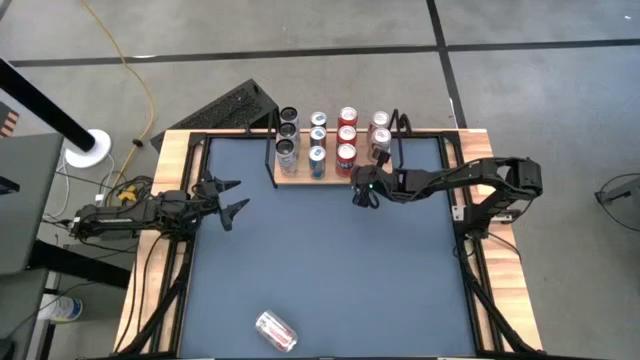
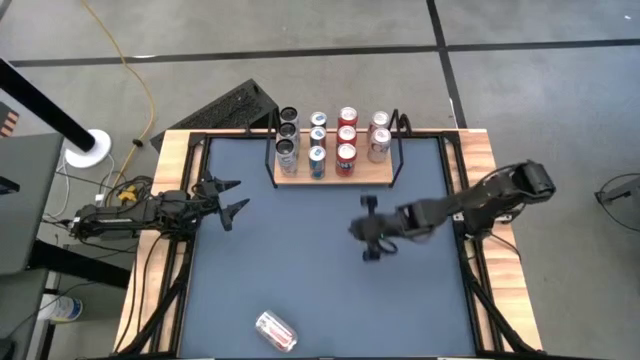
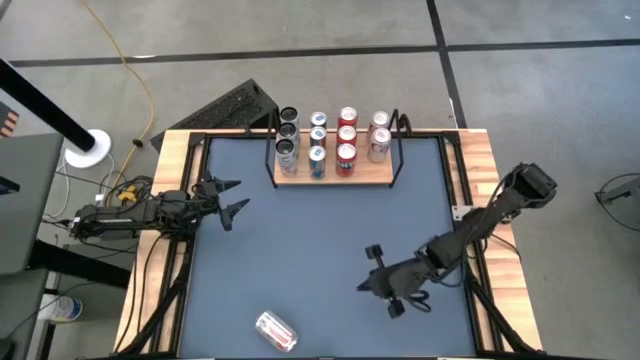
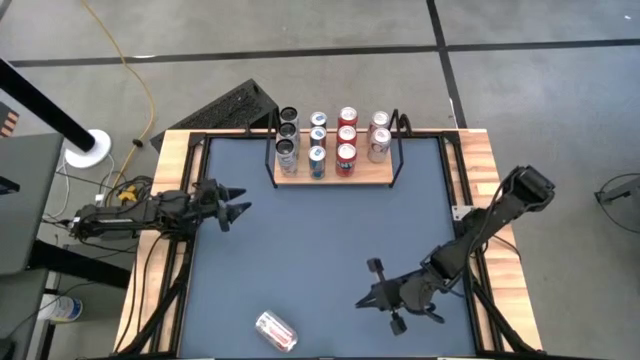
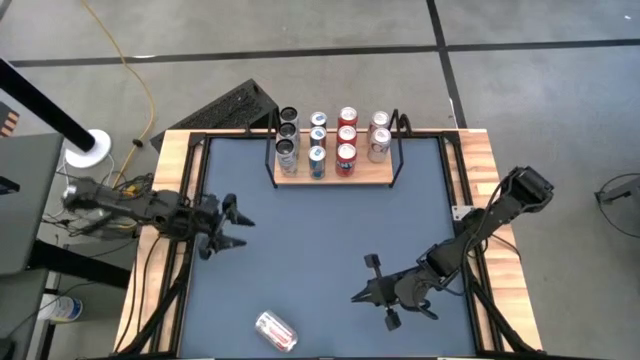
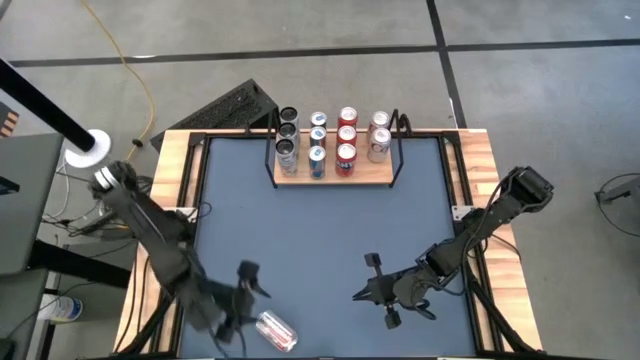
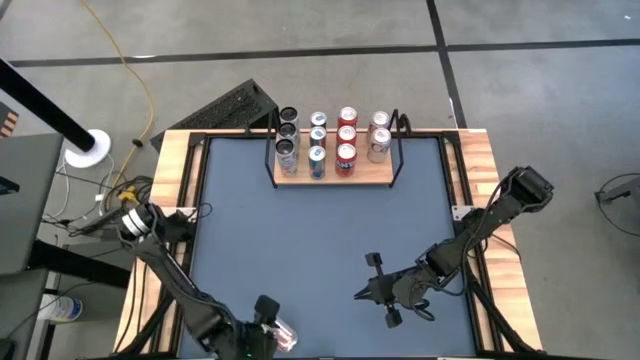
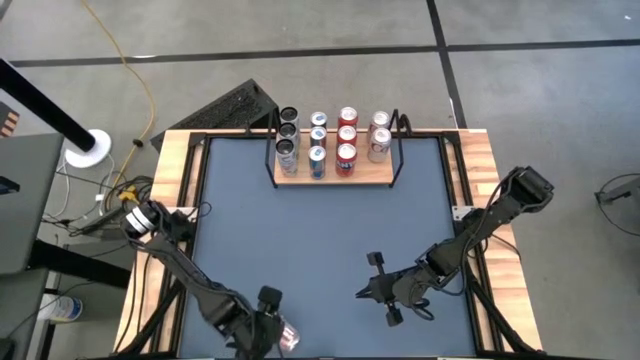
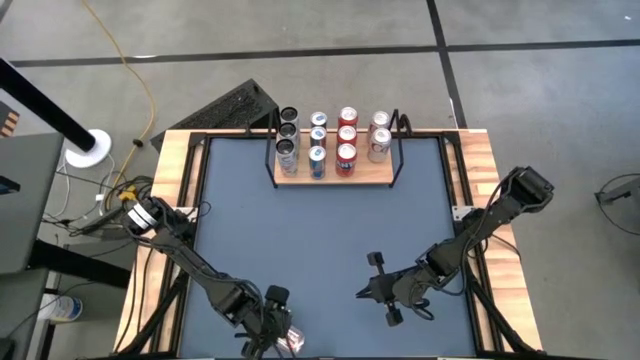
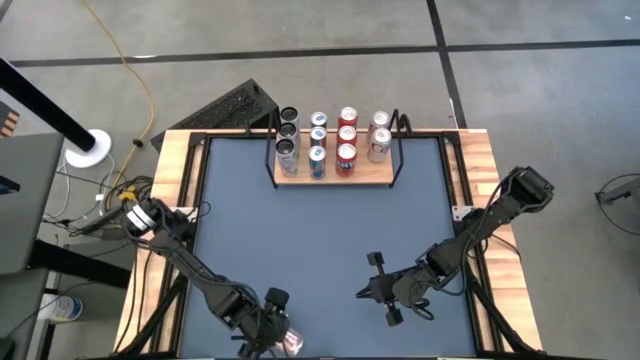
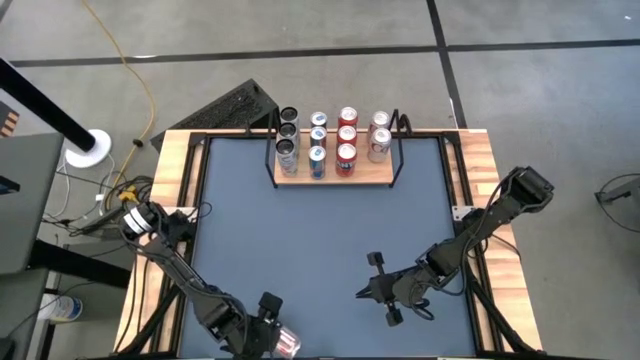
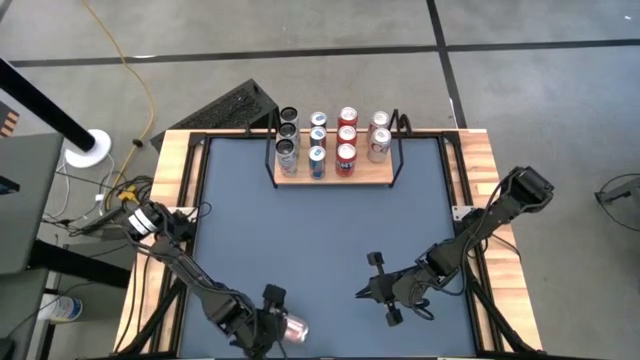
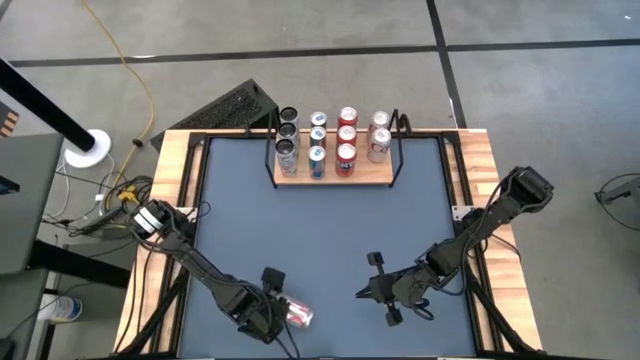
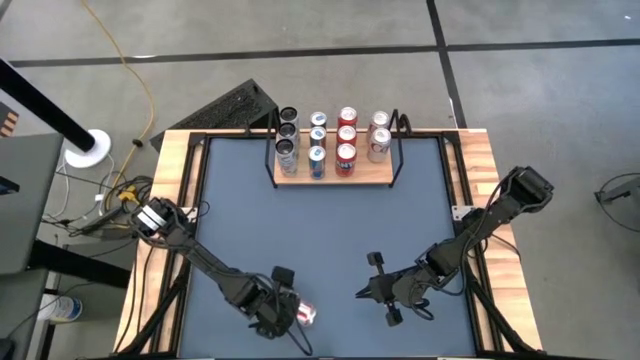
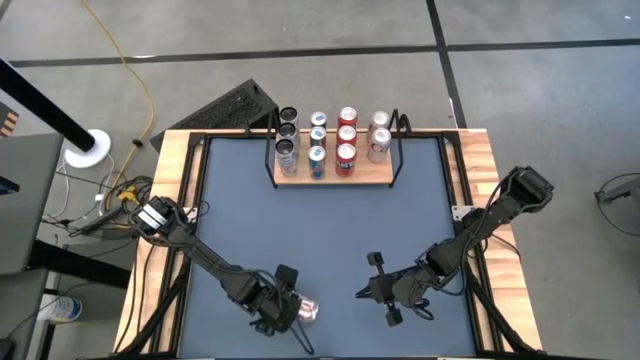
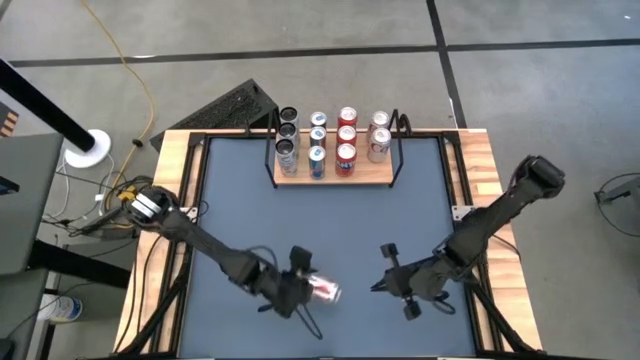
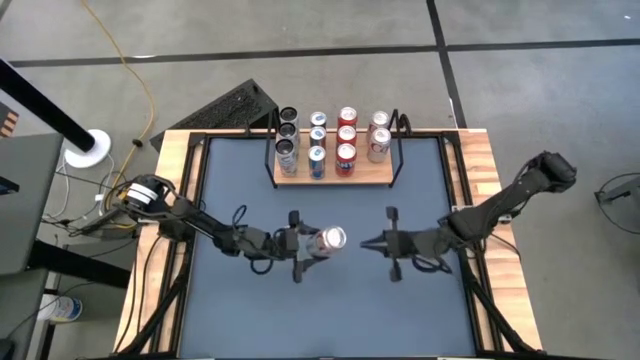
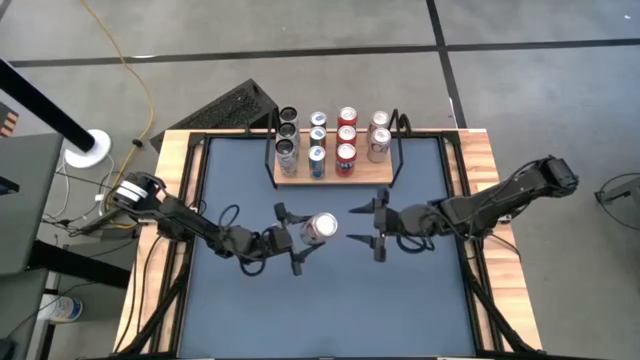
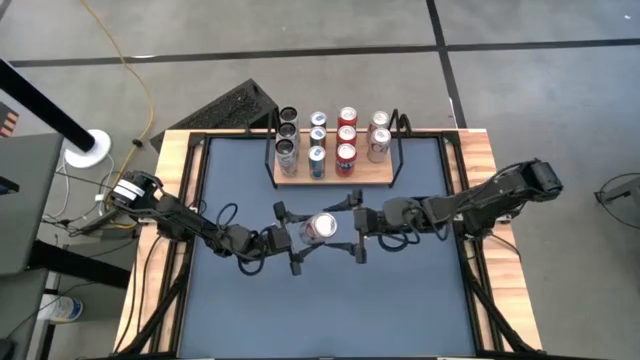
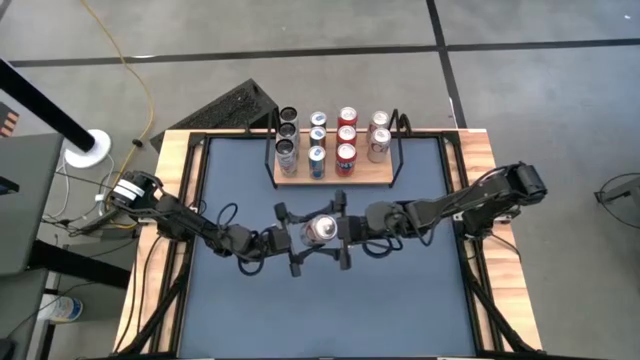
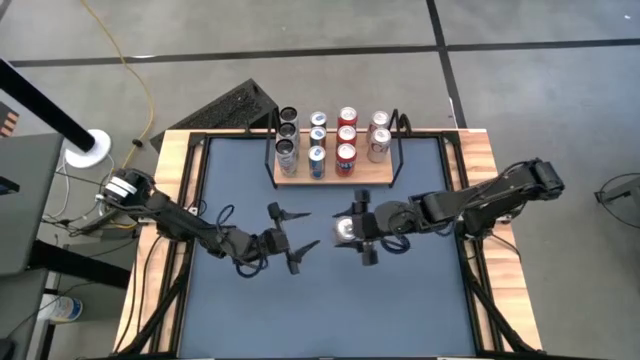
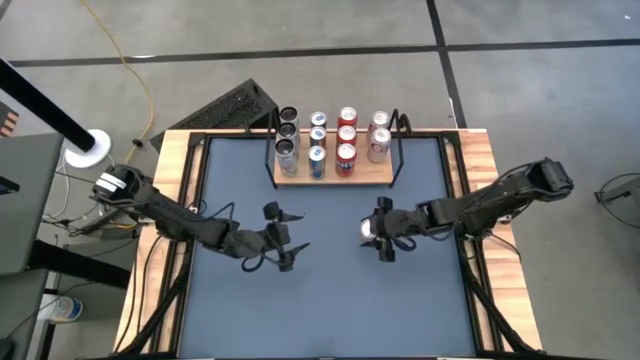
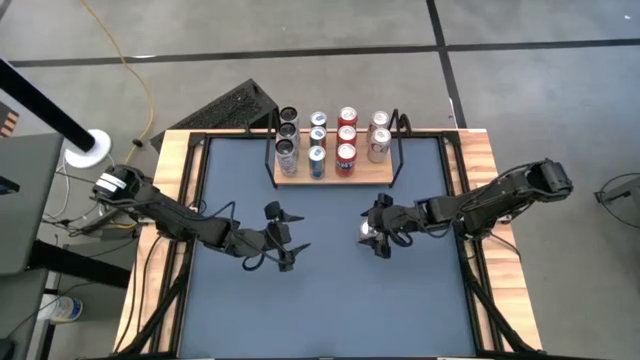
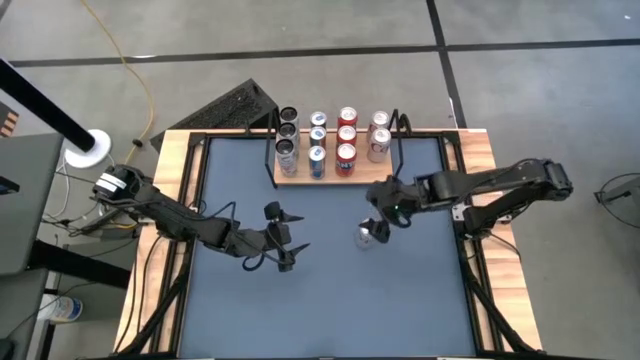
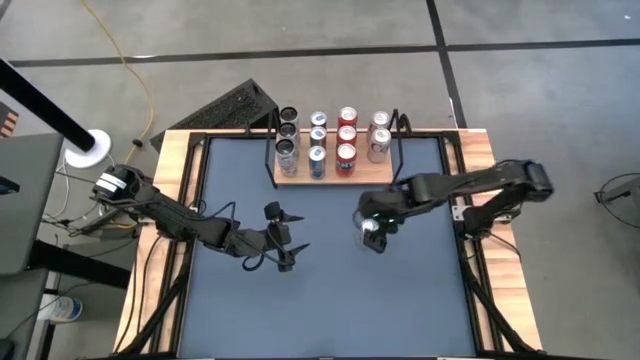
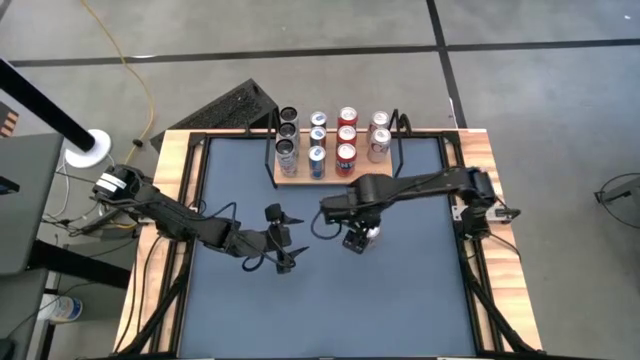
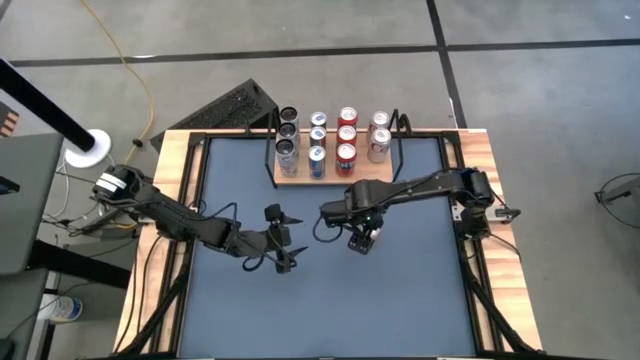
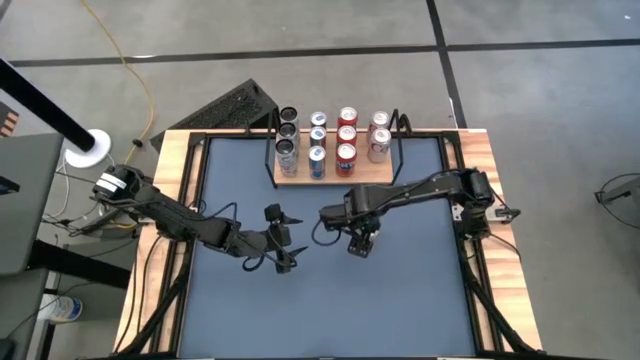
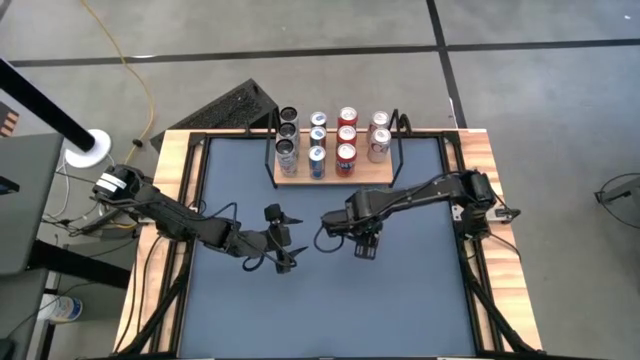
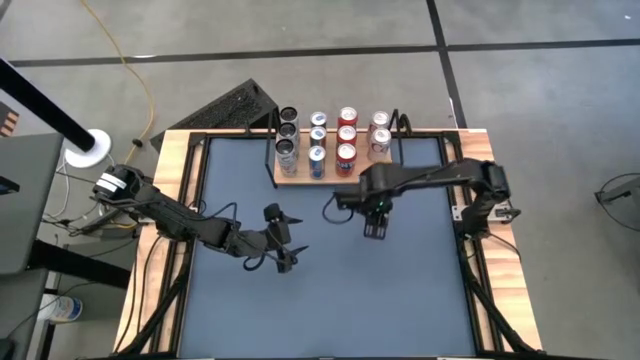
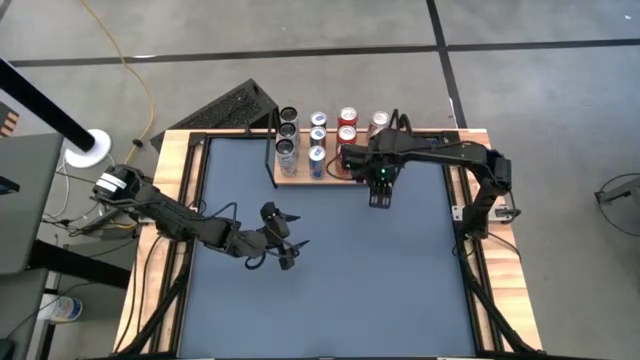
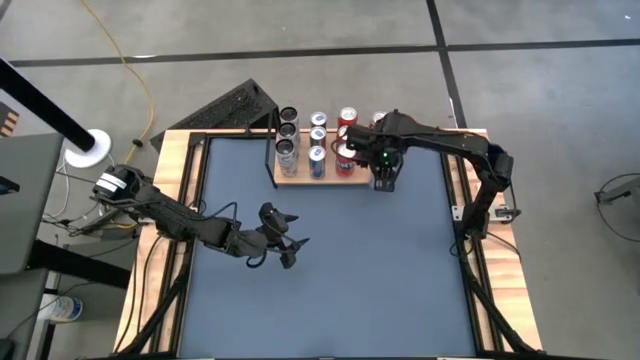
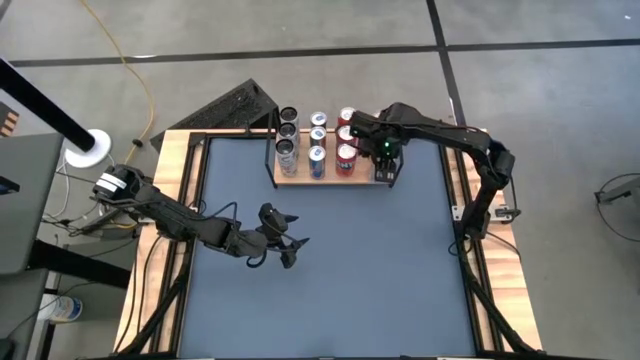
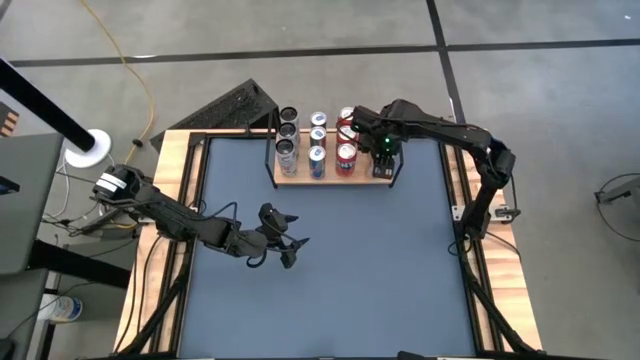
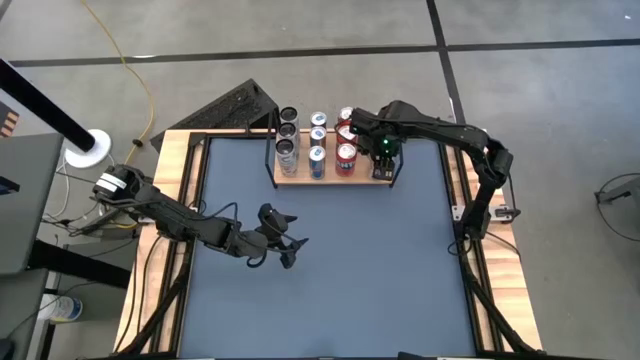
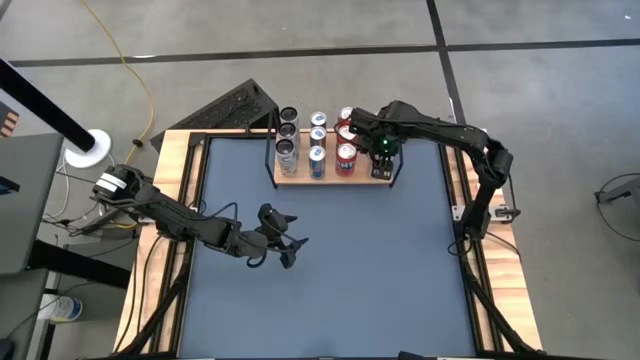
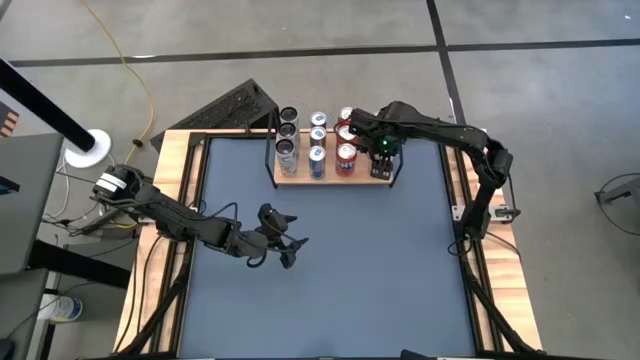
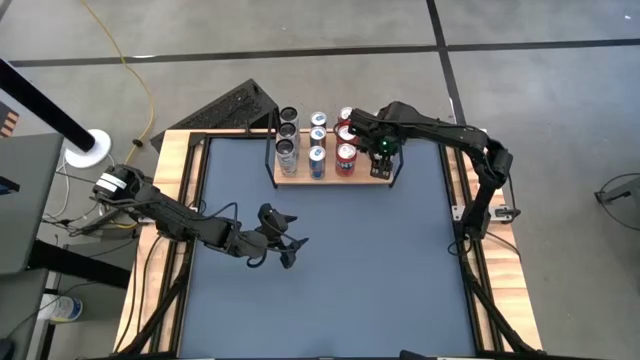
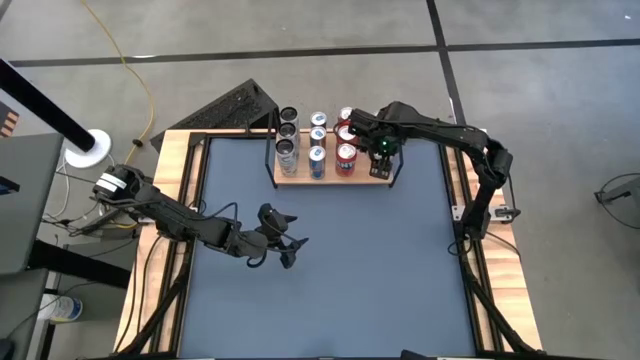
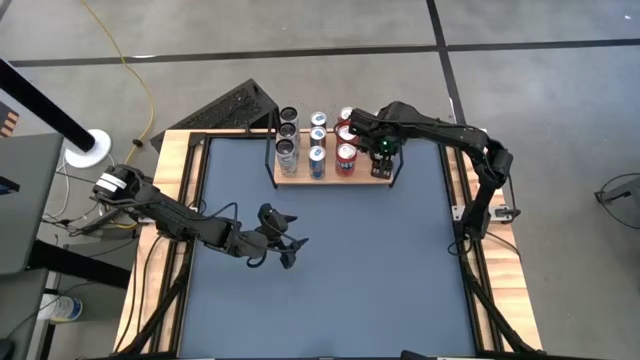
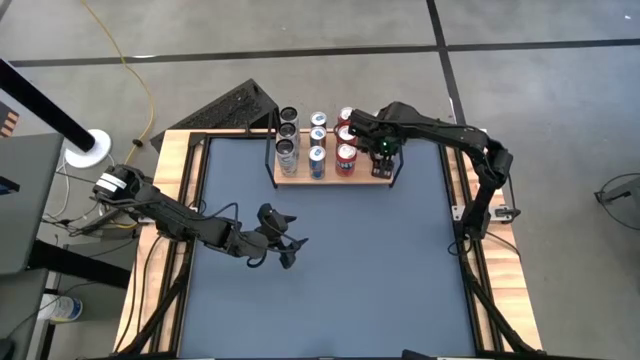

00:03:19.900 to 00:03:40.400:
Task: Place canned beverage on shelf
Put the silver soda can on the shelf aligned with the other silver soda cans

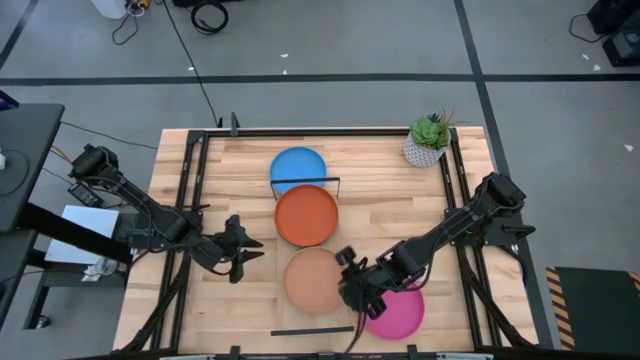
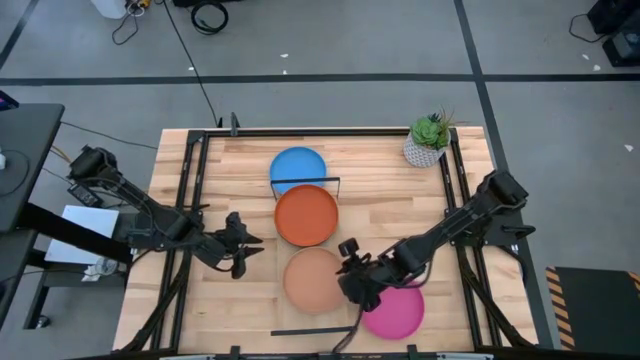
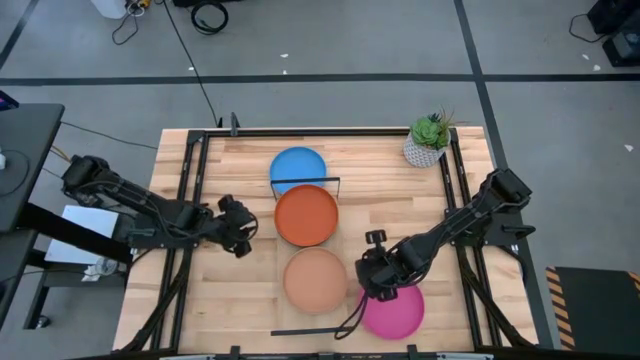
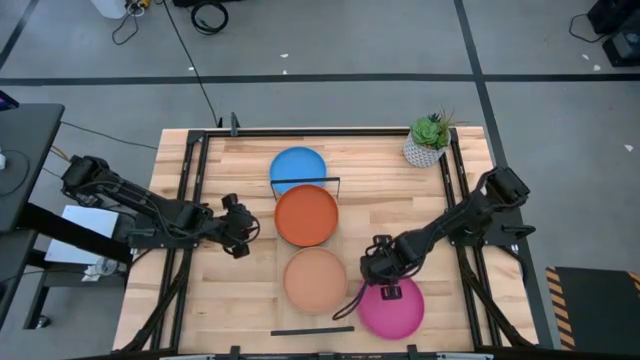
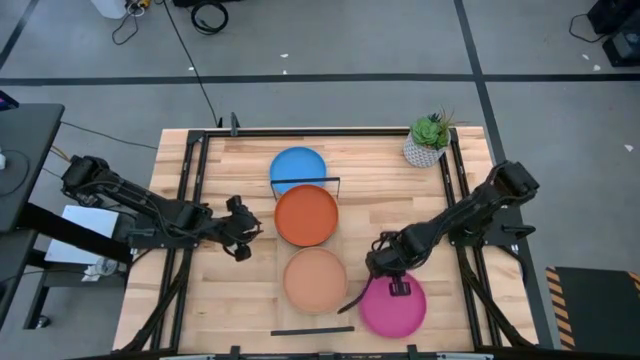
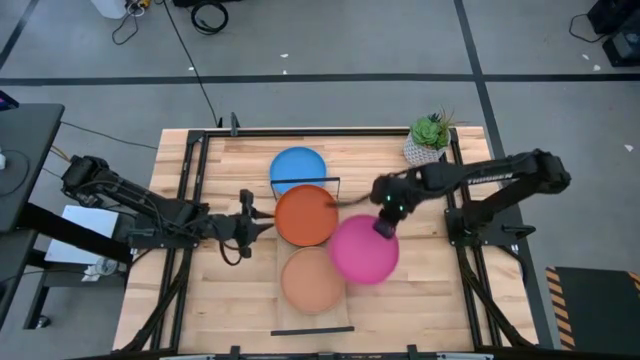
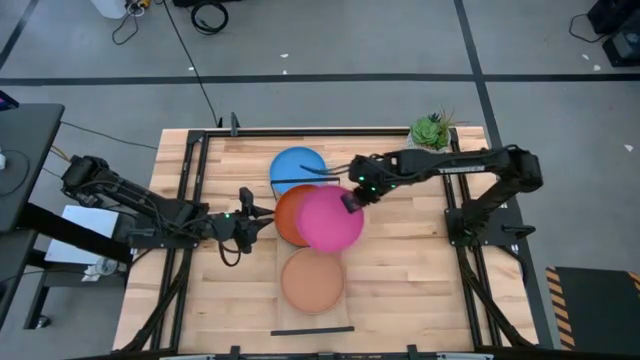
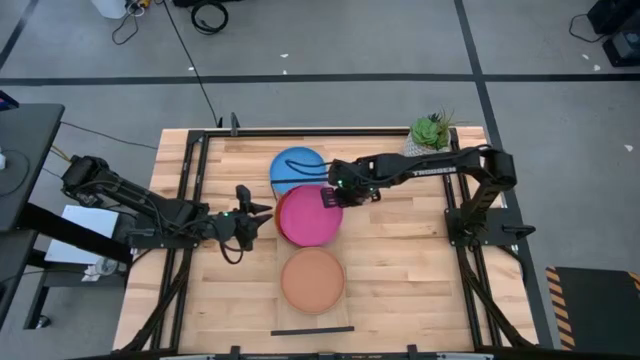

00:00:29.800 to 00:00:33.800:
Task: Place and stack plates onto a shelf
Stack the pink plate on top of the brown plate on the shelf
